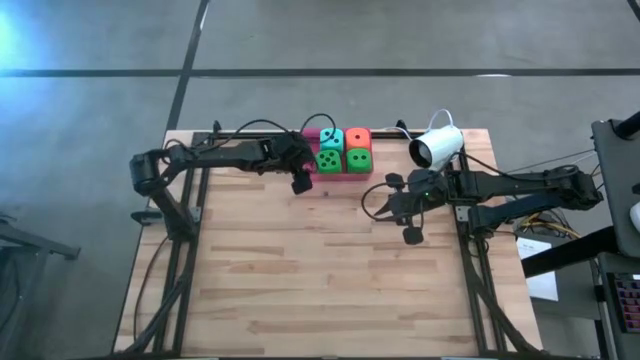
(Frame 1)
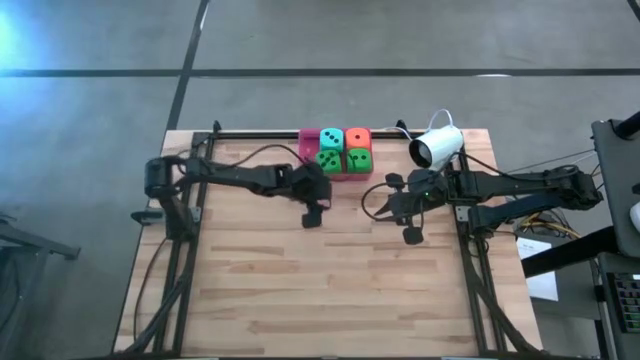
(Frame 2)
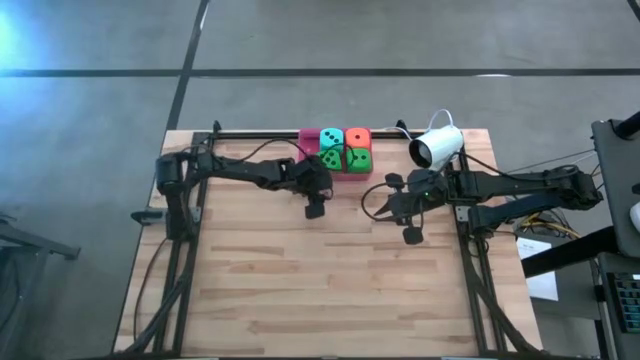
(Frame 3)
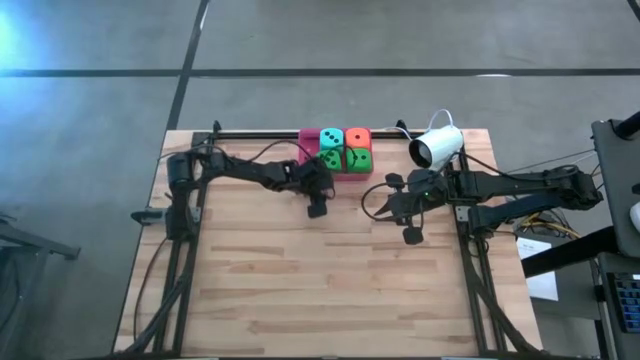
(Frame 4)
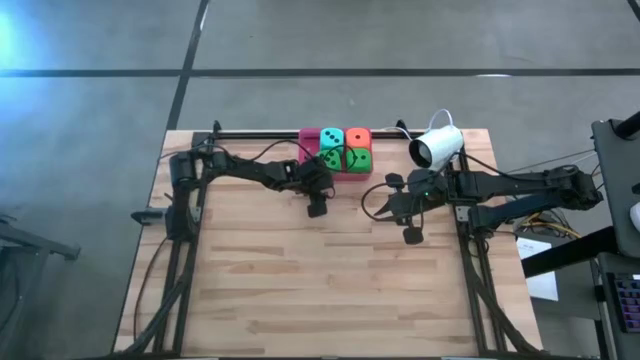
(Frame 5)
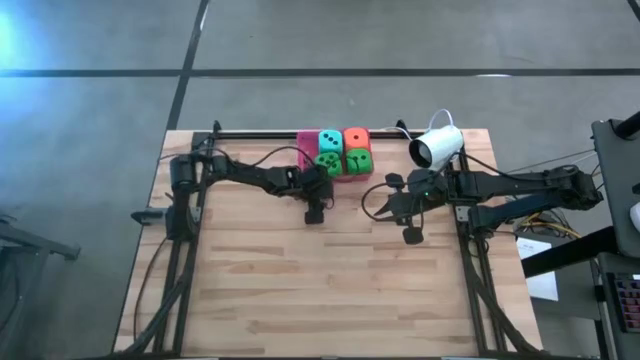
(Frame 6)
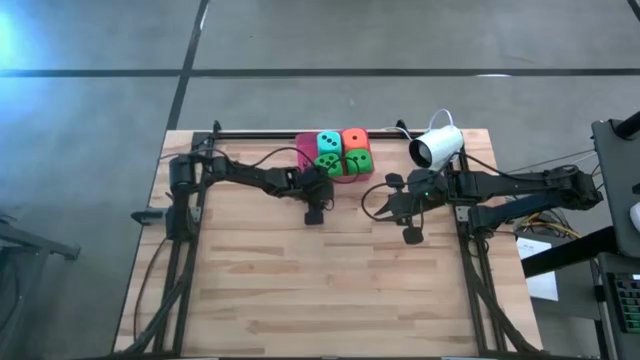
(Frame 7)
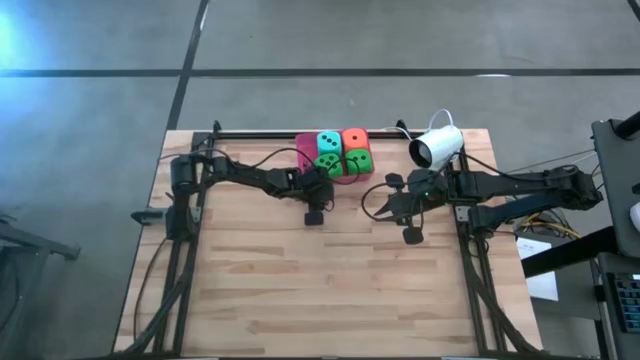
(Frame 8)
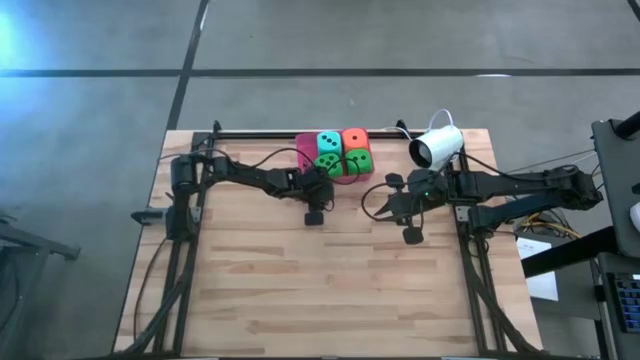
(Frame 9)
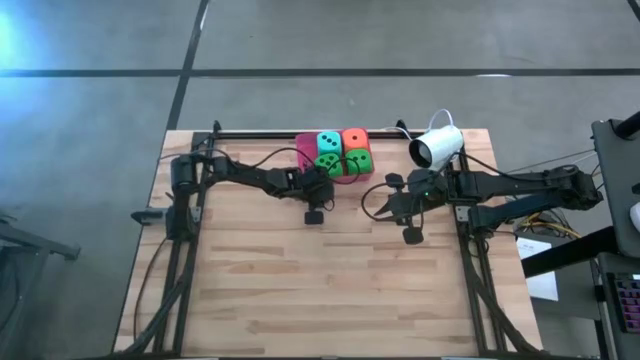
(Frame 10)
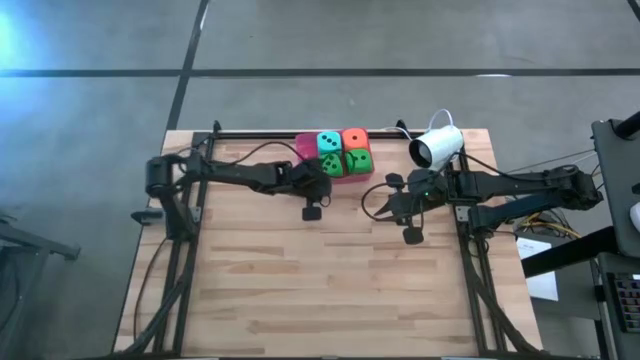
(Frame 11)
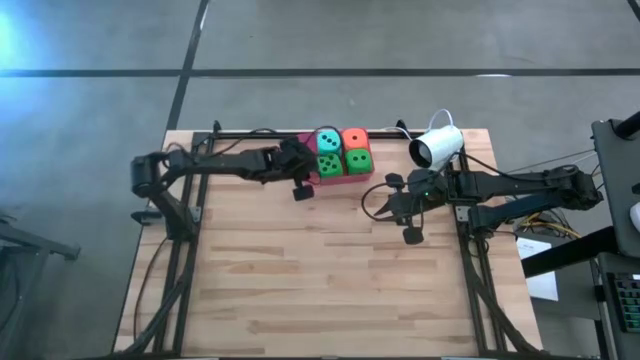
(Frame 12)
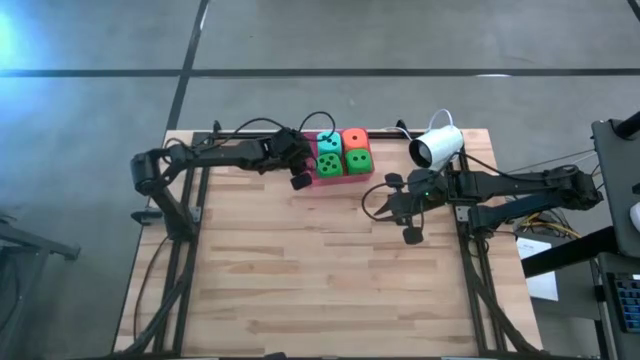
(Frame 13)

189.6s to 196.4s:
Task: Pick & Place Dice
Put the small purple dice into the the pink bin

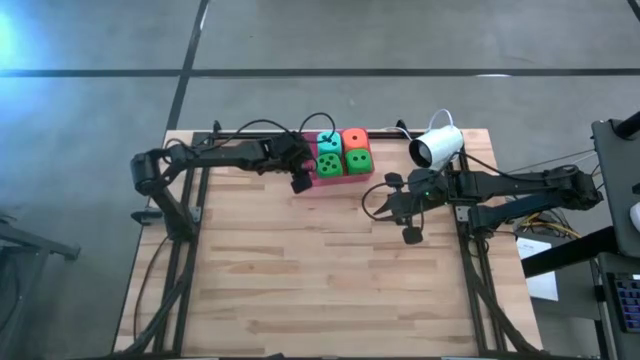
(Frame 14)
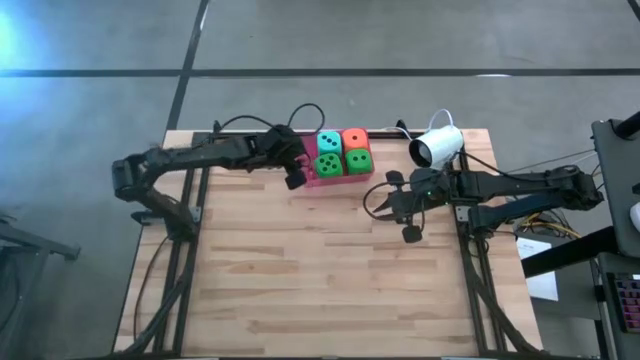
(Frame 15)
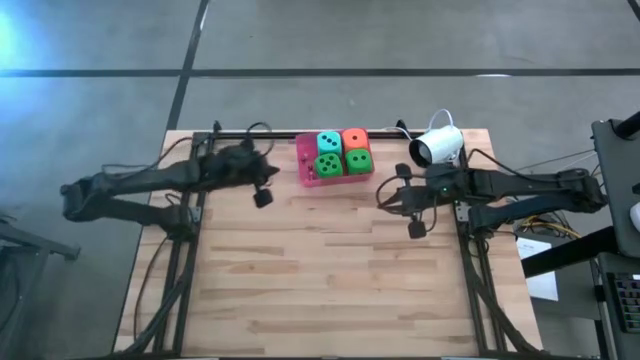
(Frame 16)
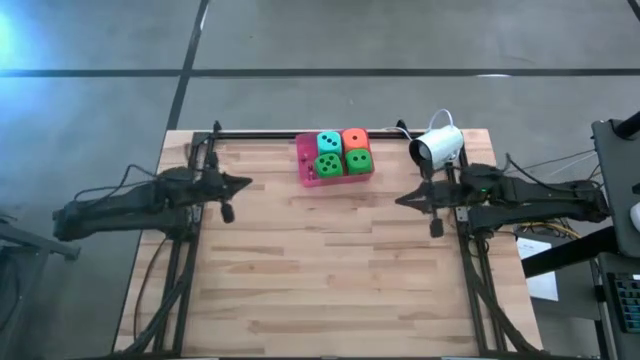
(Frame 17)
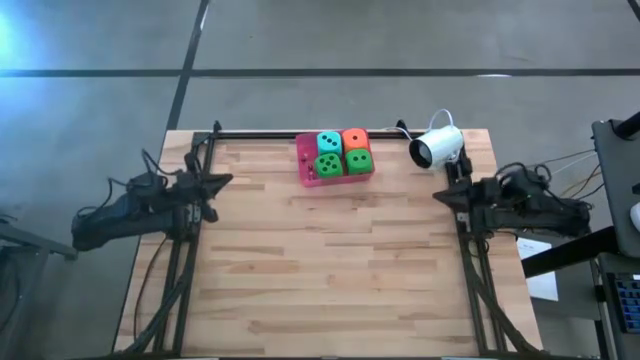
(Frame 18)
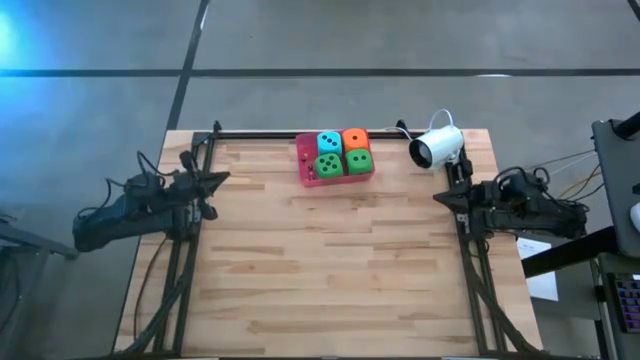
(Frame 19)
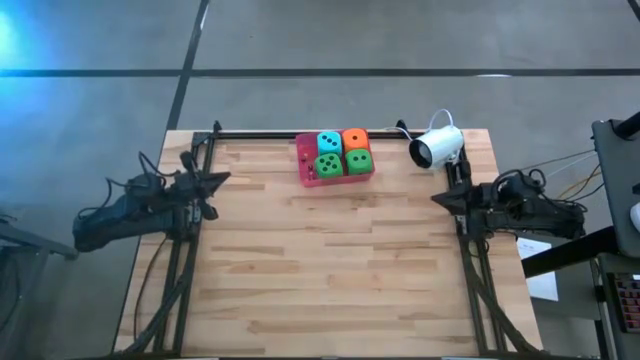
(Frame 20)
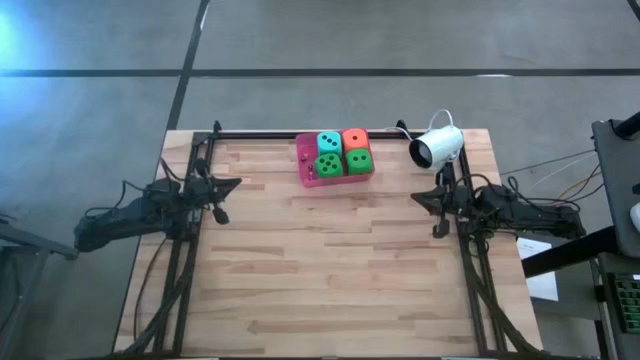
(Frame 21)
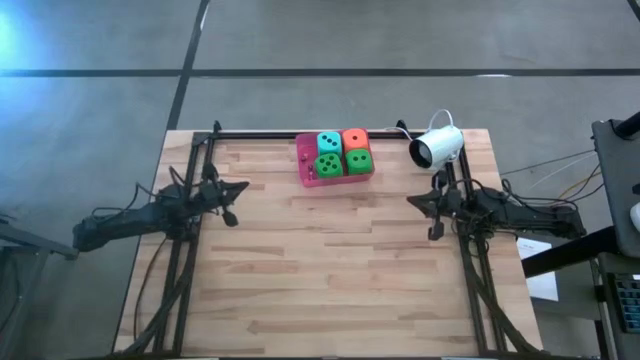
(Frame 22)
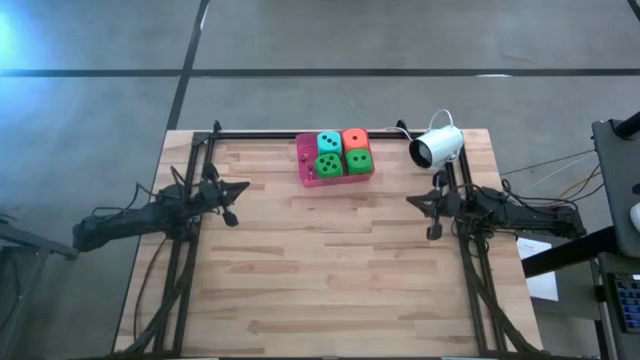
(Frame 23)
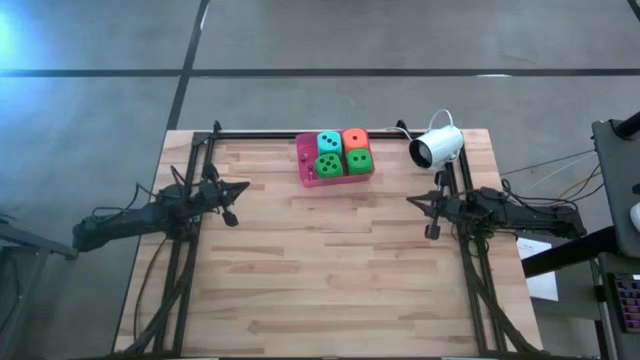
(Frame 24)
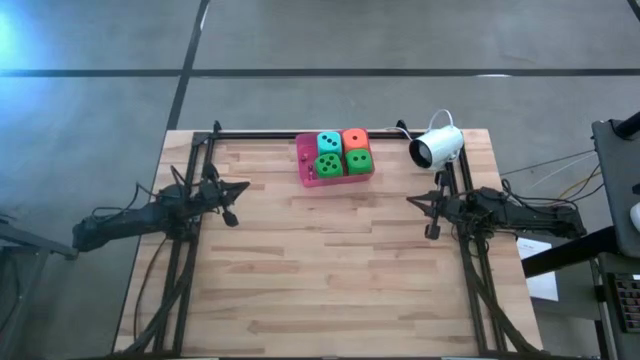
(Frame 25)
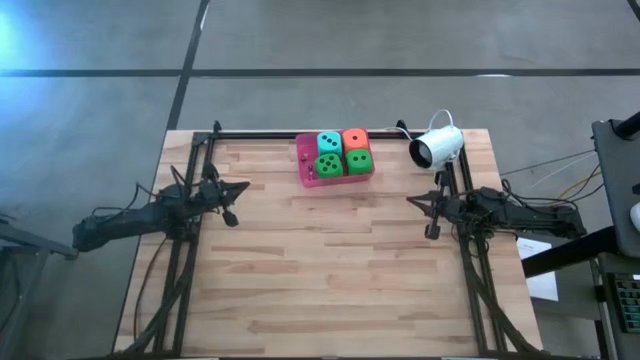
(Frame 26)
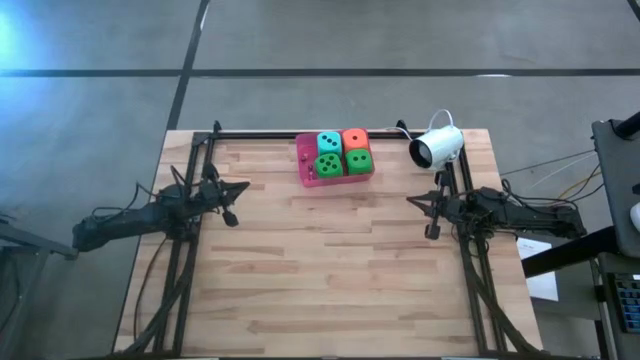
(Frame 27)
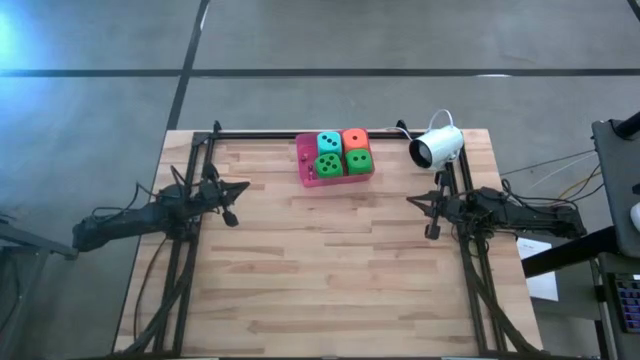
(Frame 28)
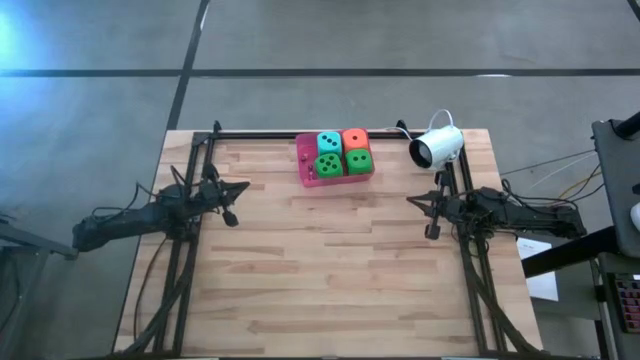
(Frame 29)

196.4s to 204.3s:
Return to Home Position

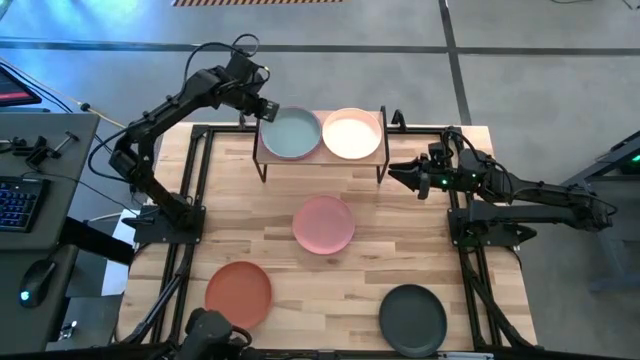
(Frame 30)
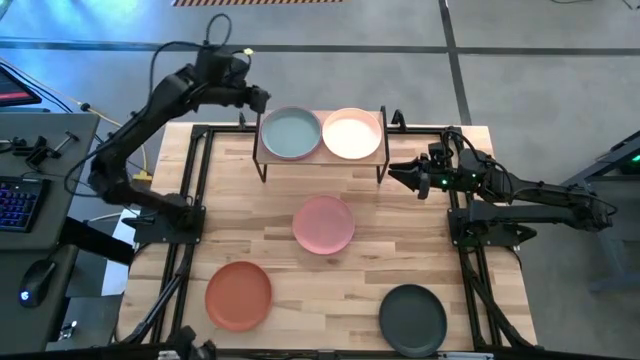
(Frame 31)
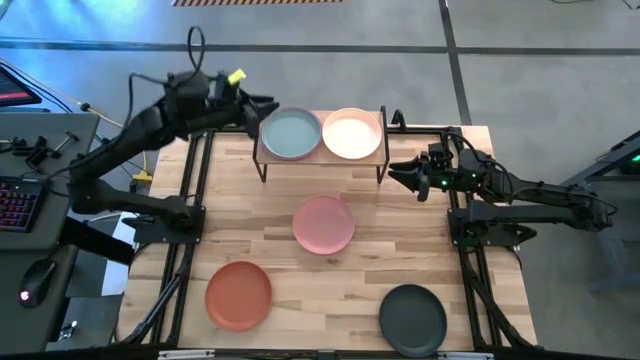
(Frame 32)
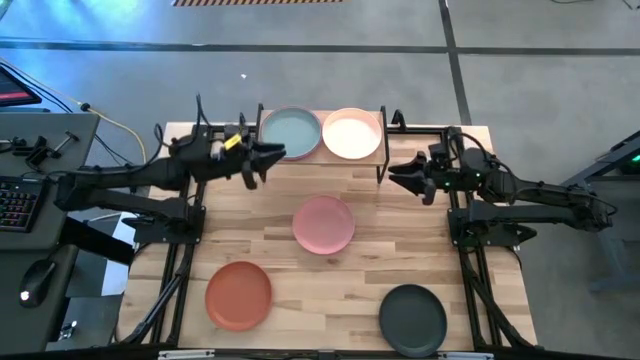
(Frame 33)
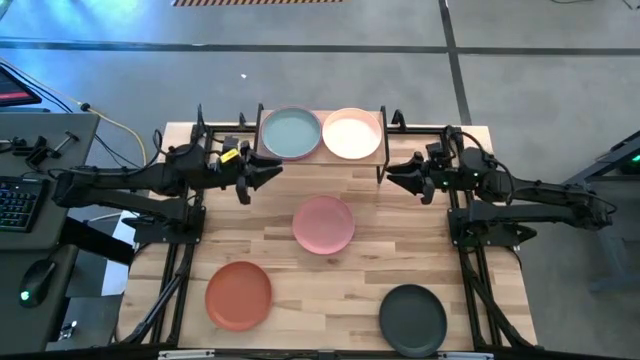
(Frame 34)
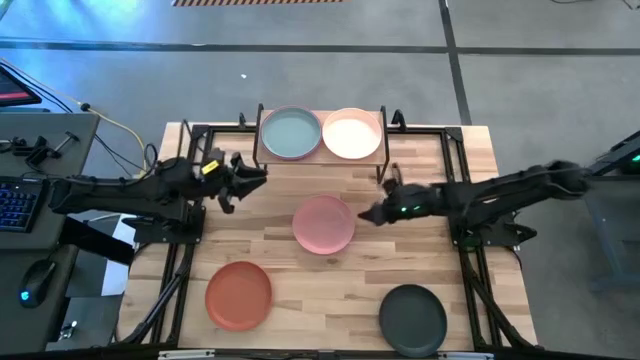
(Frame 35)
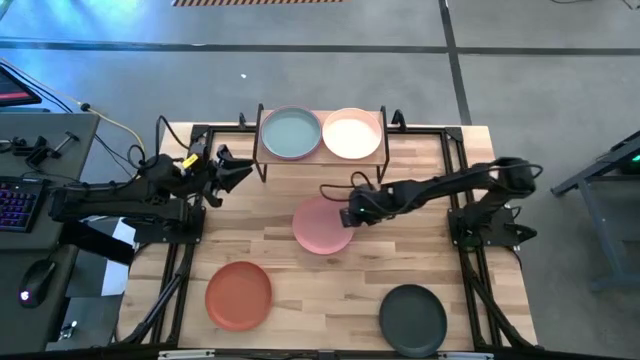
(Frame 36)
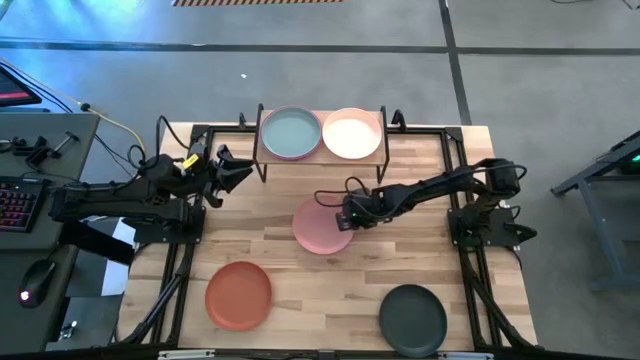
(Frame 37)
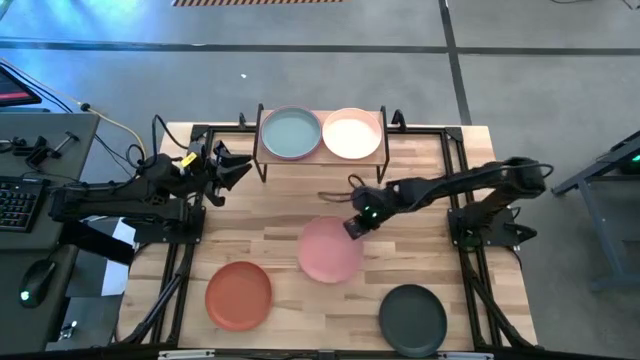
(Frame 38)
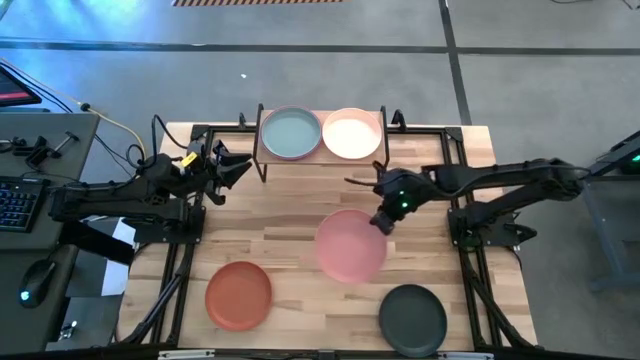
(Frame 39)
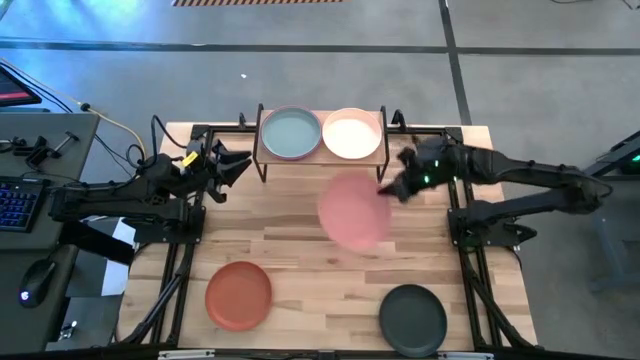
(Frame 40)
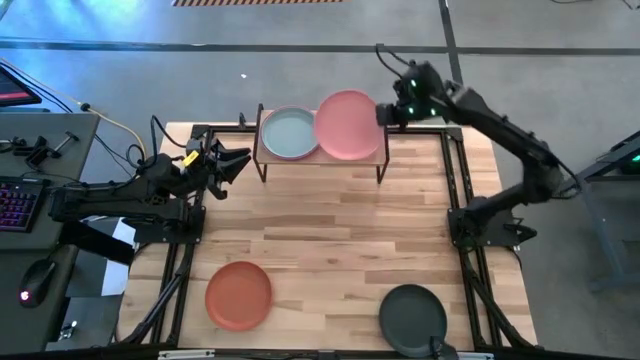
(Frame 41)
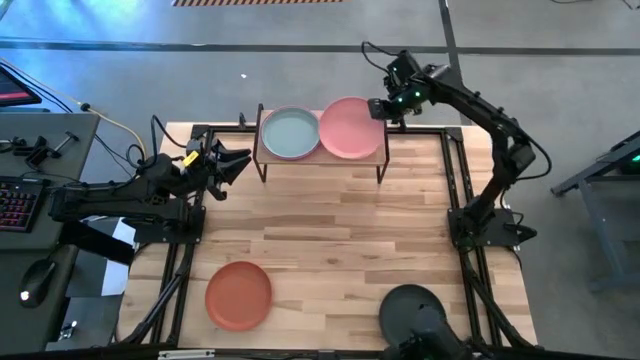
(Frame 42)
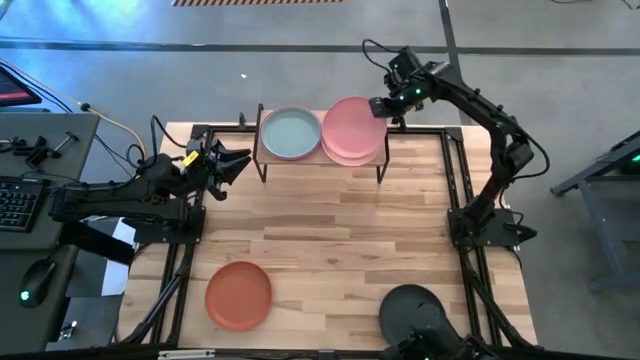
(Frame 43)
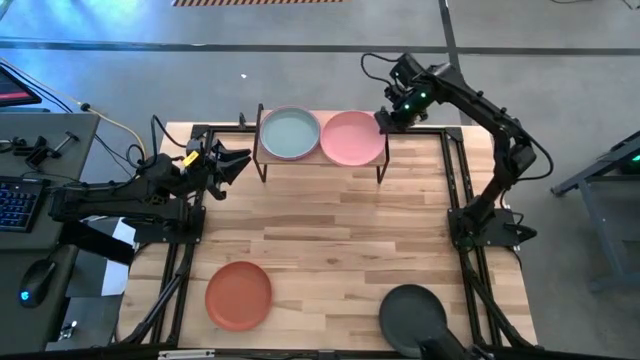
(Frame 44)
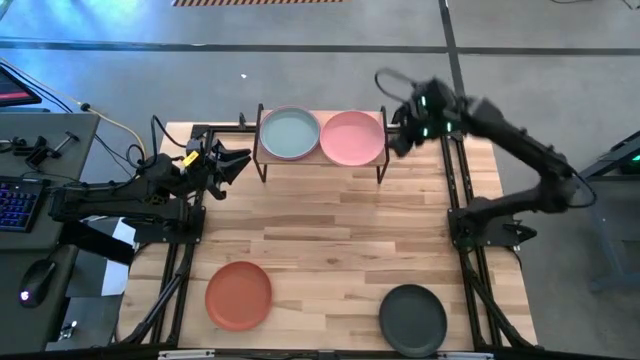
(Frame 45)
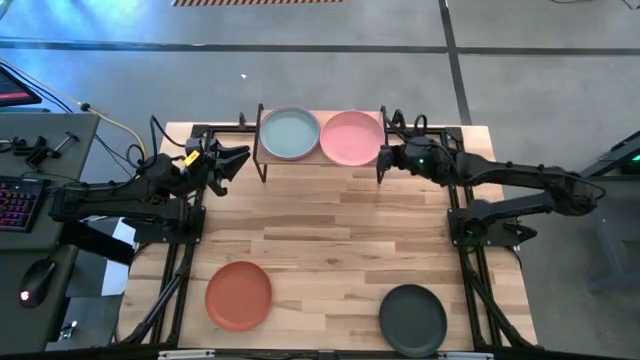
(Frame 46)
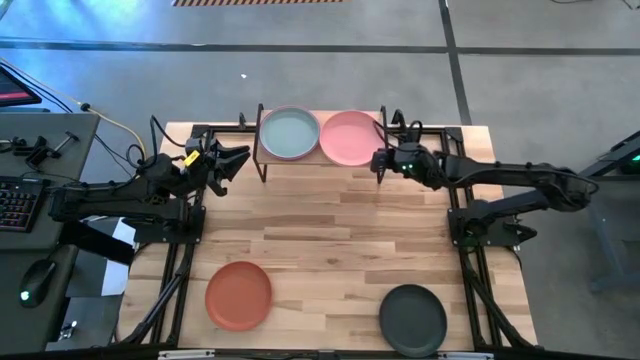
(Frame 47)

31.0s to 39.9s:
Task: Place and stack plates onto a shelf
Stack the light pink on the white plate on the shelf
